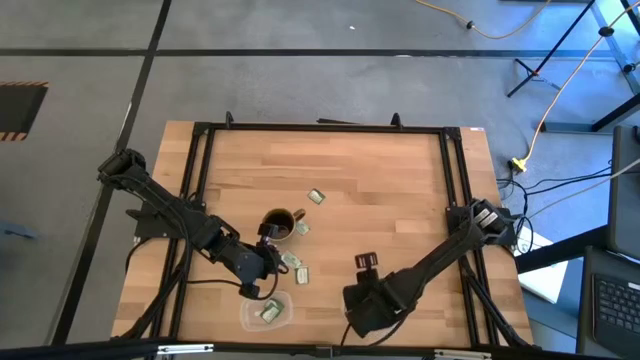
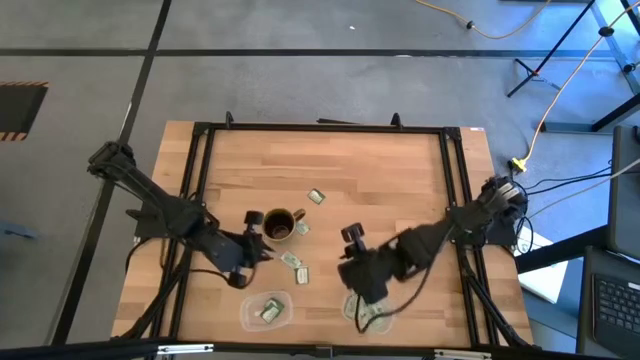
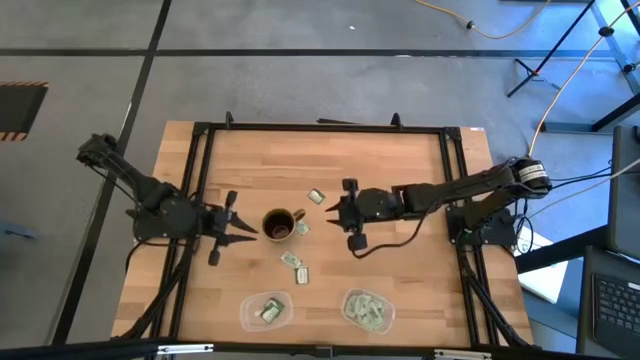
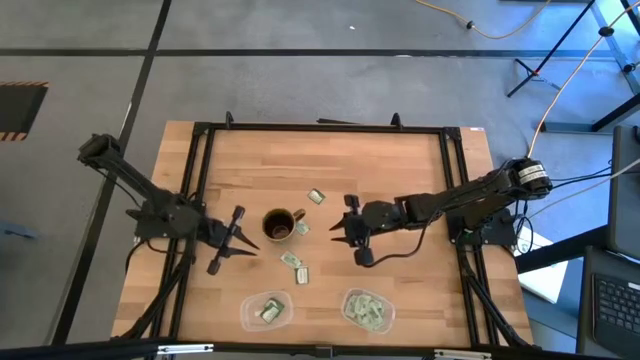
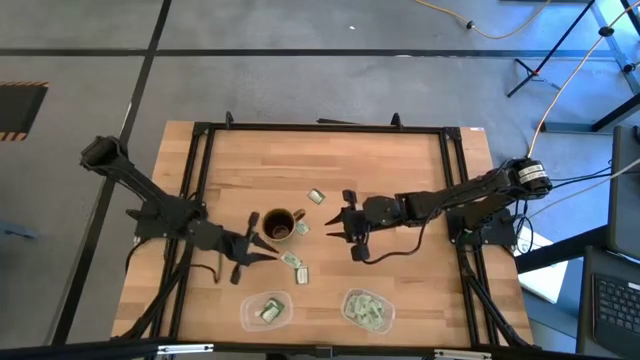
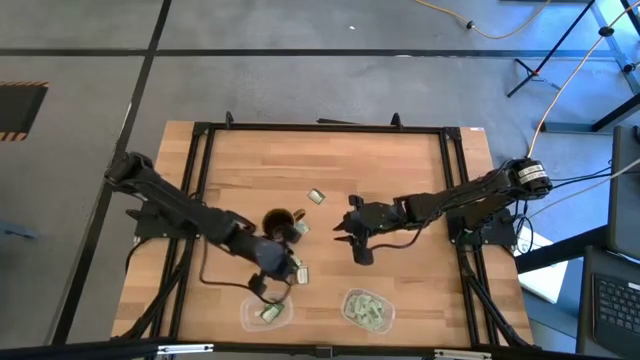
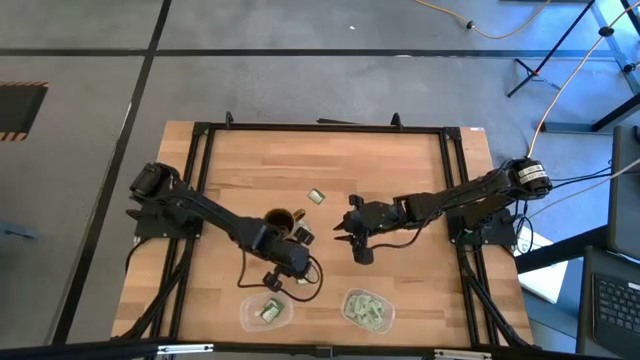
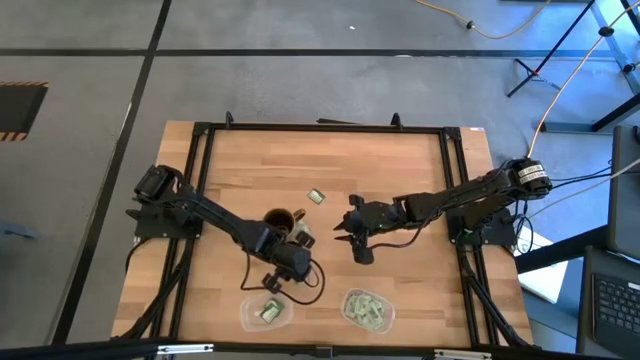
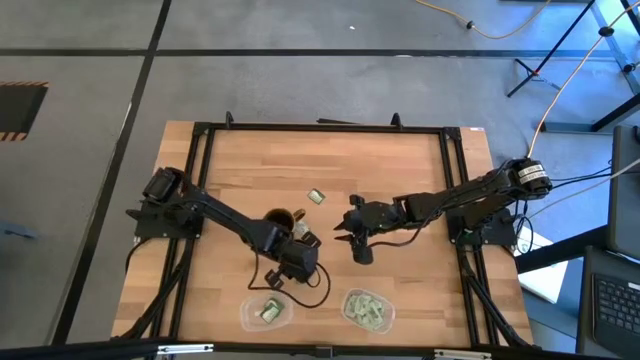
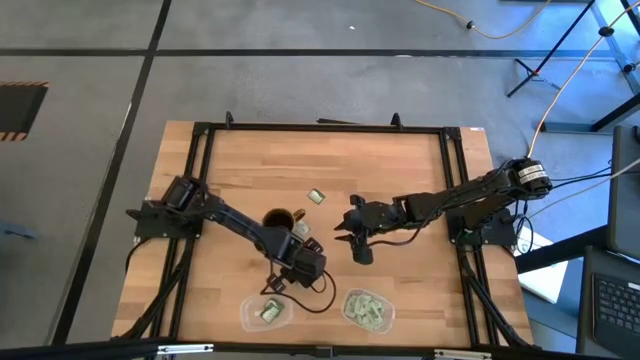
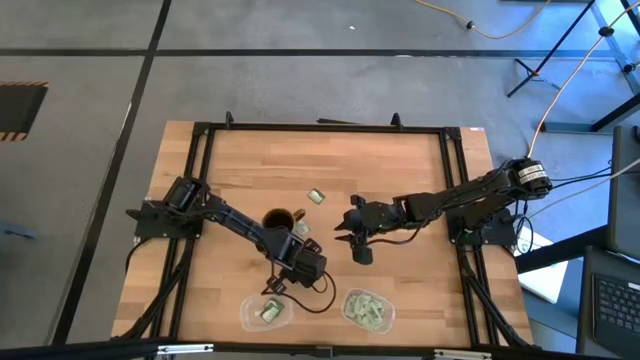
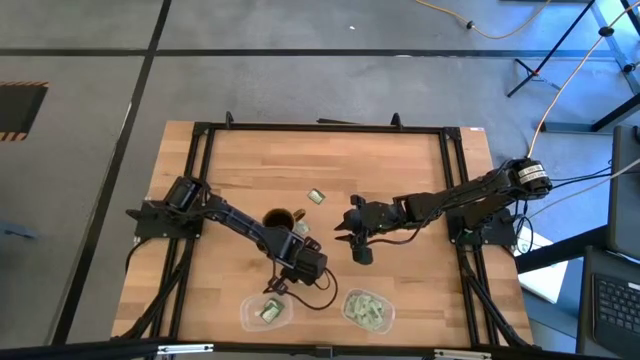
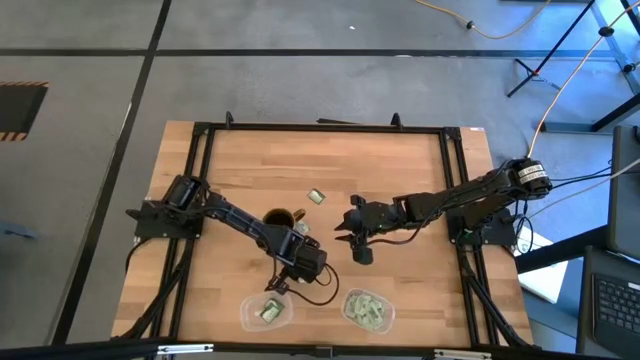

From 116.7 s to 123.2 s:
Task: Pick and place items into bin
Put the green stevia packet into the left transparent bin

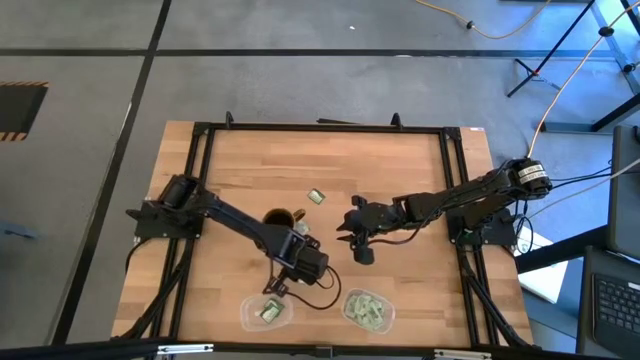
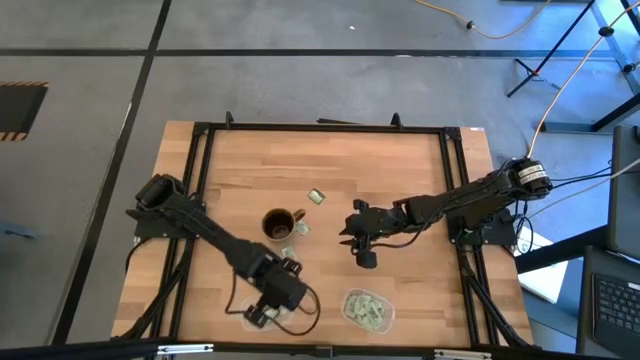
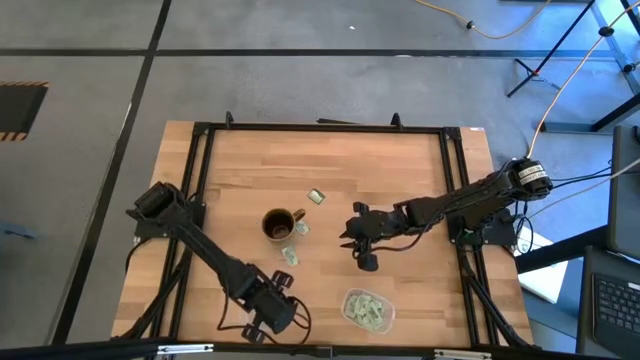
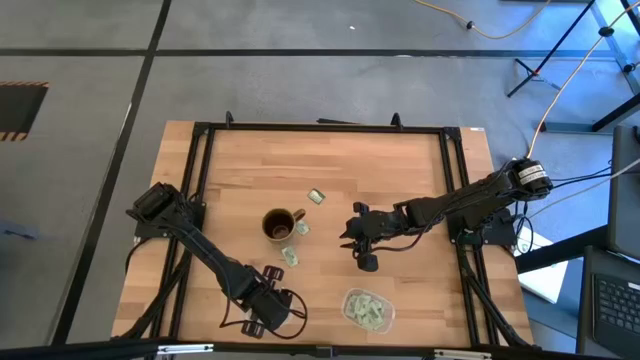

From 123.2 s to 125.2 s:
Put the green stevia packet into the left transparent bin

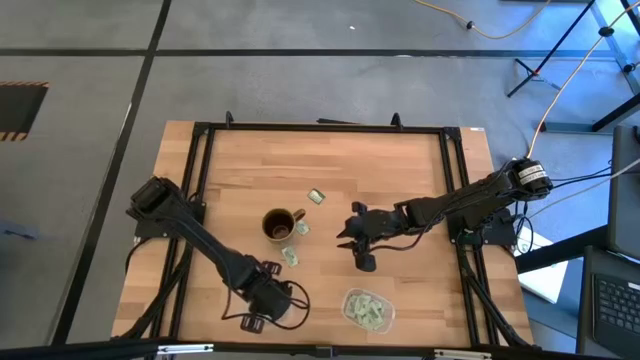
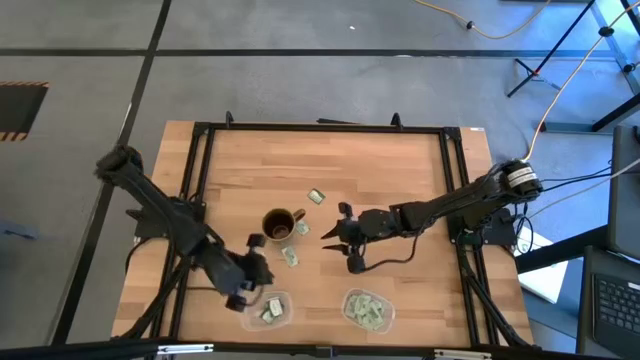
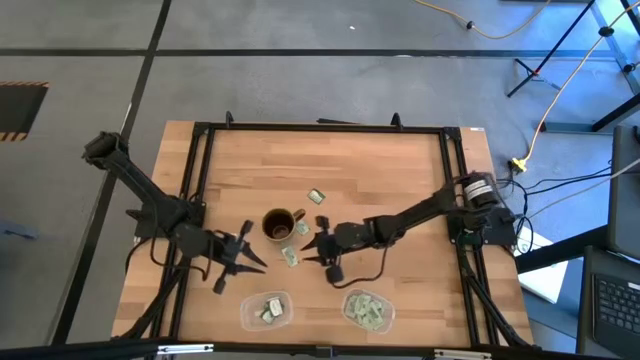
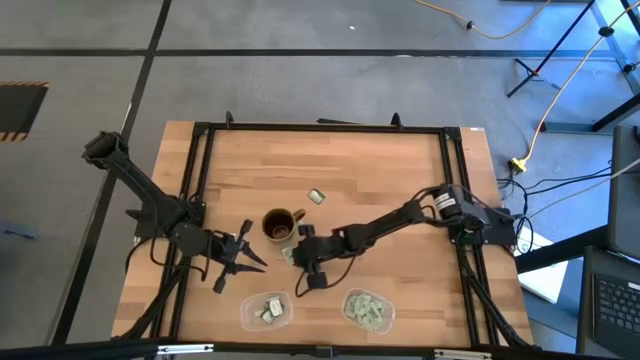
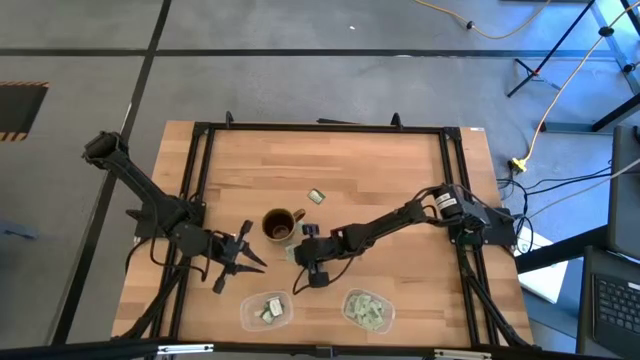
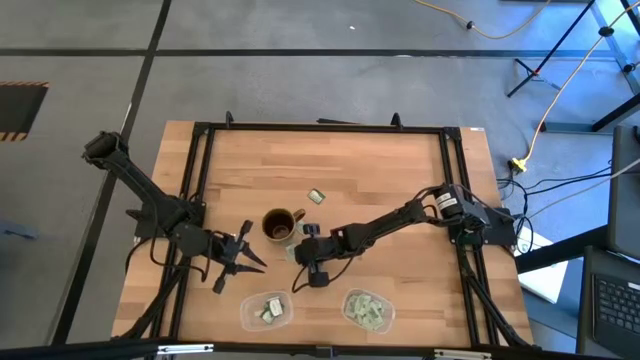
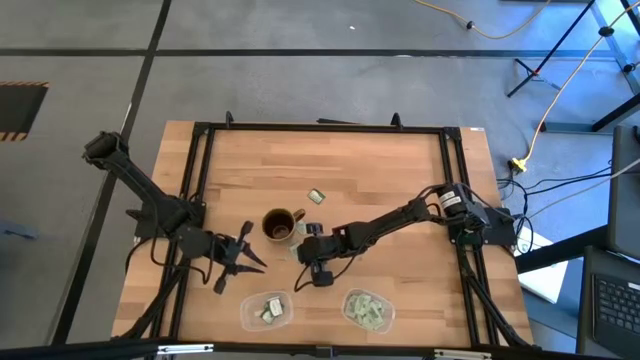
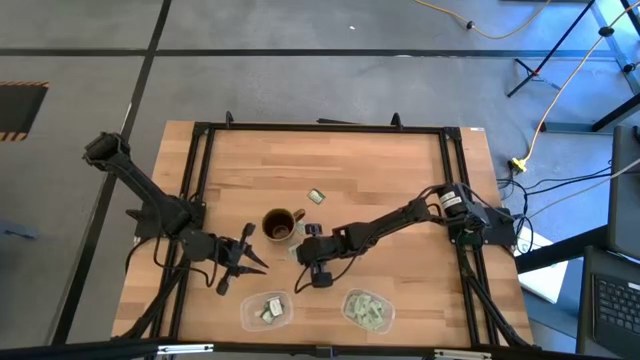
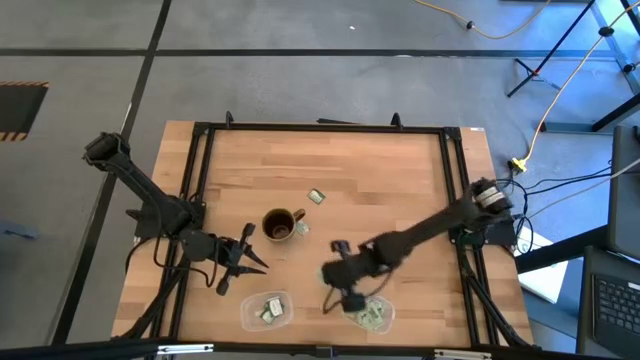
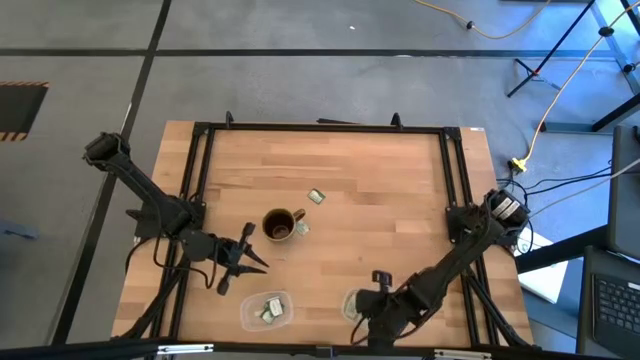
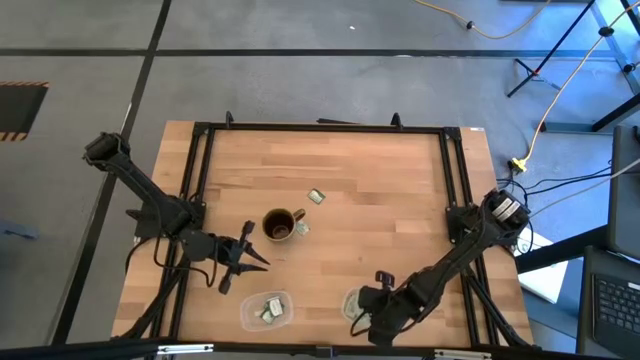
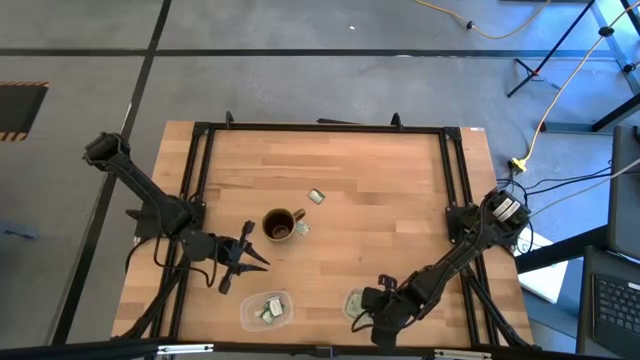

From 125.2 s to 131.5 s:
Put the white stevia packet into the right transparent bin

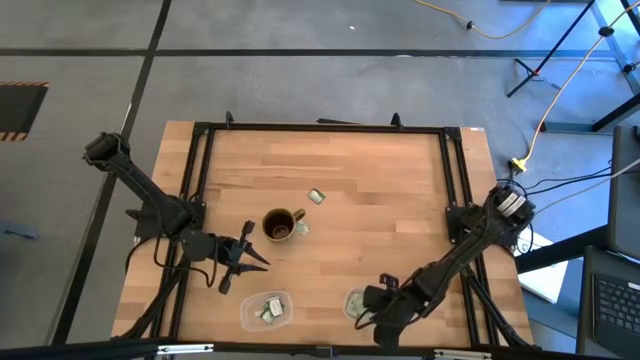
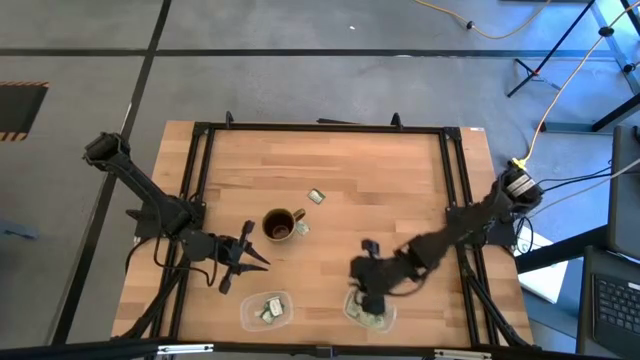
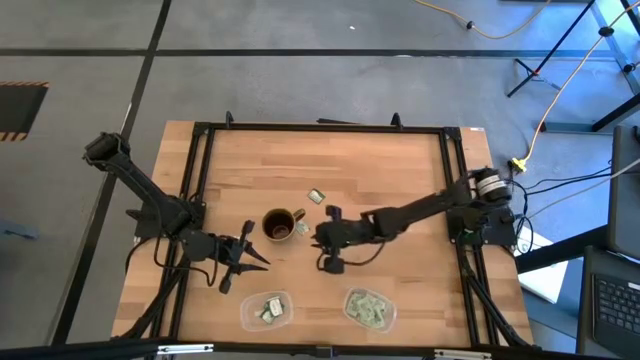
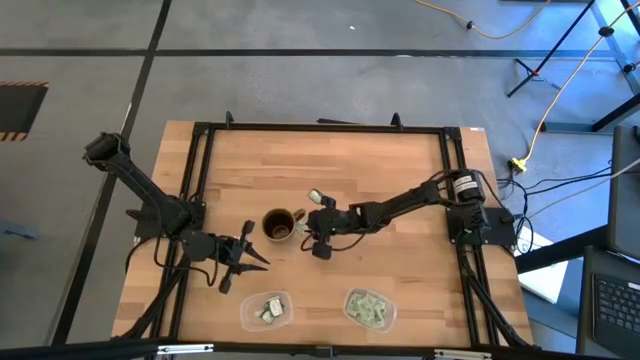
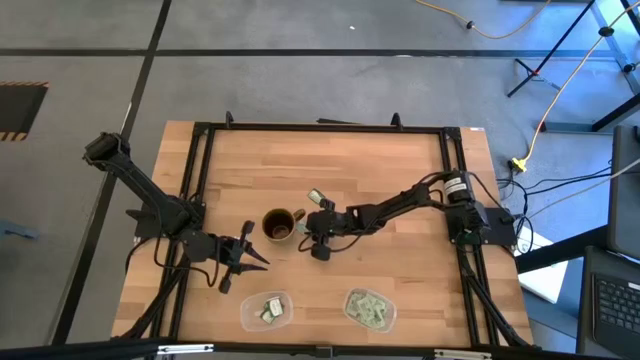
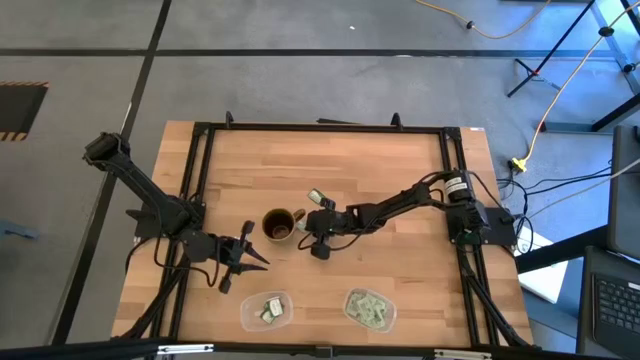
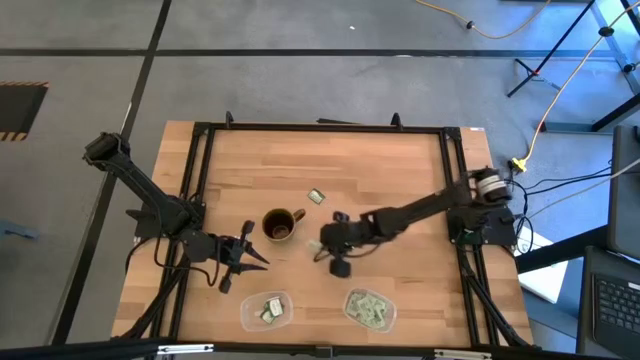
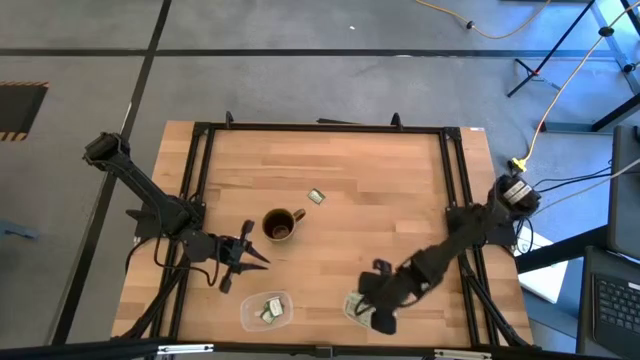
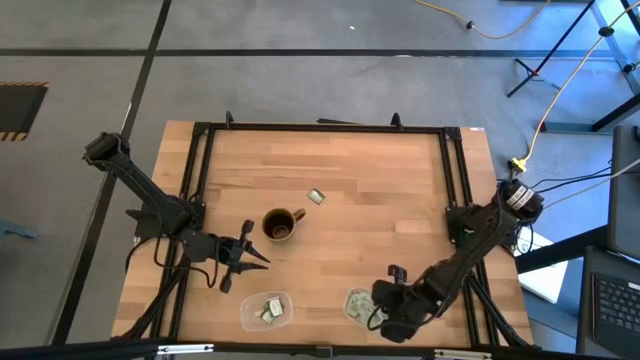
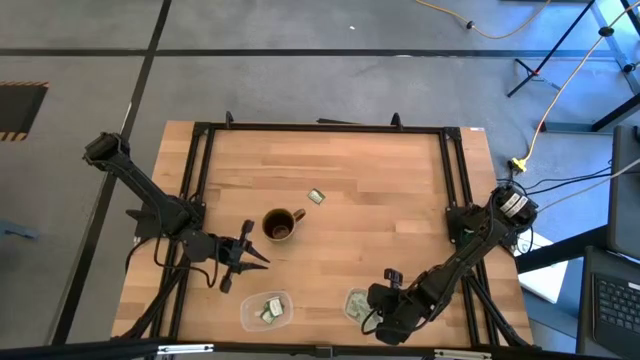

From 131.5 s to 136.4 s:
Put the white stevia packet into the right transparent bin

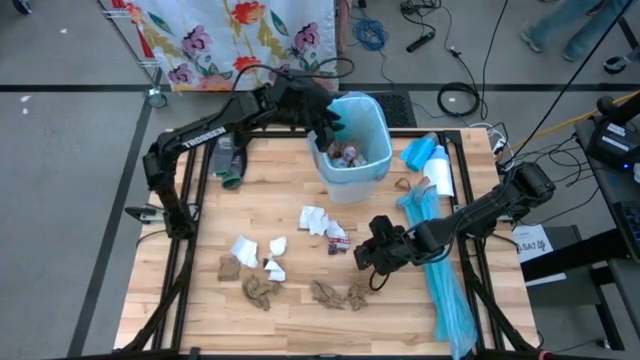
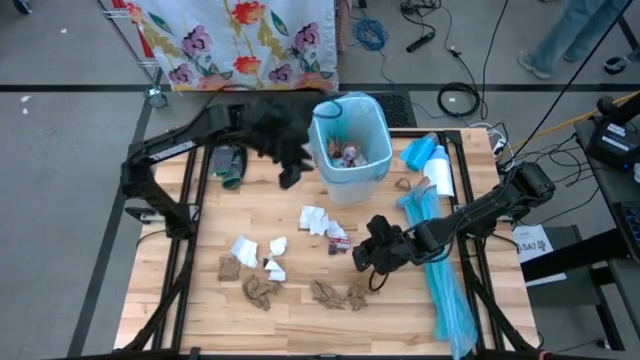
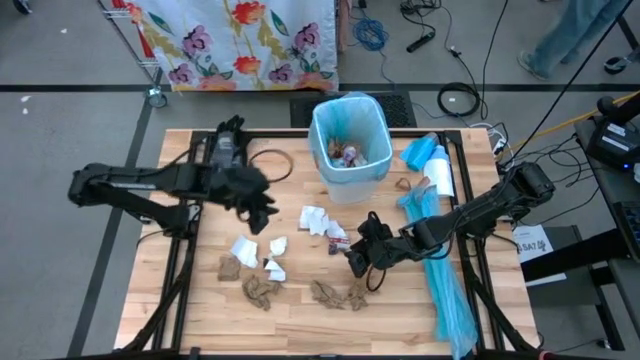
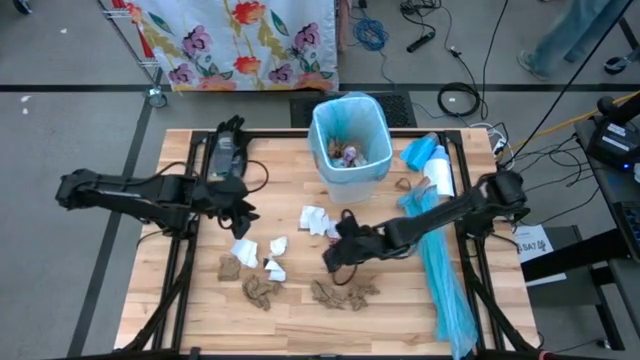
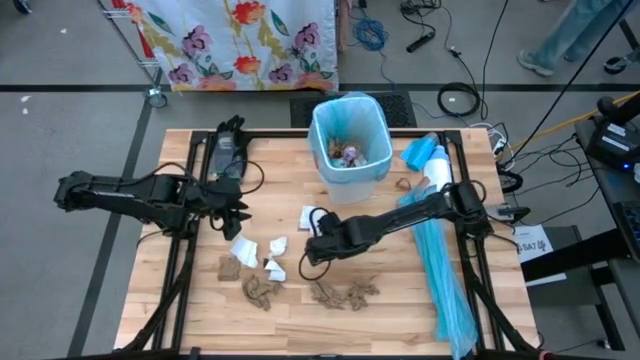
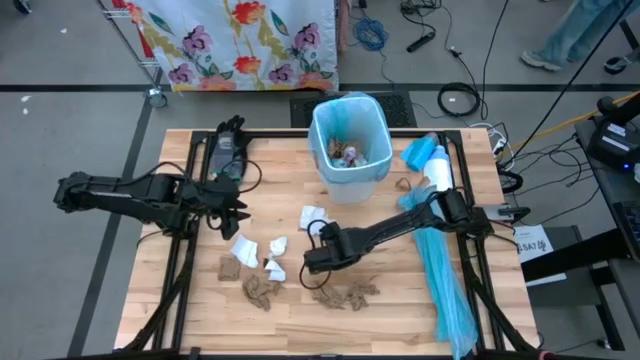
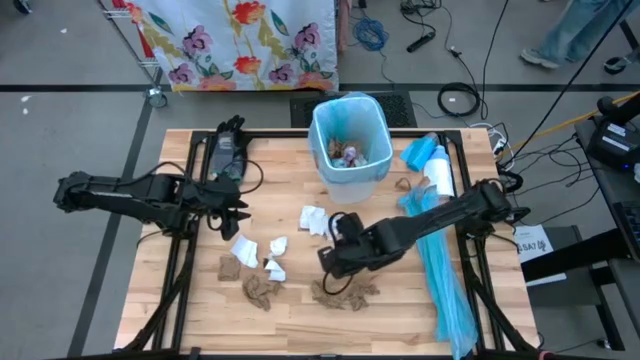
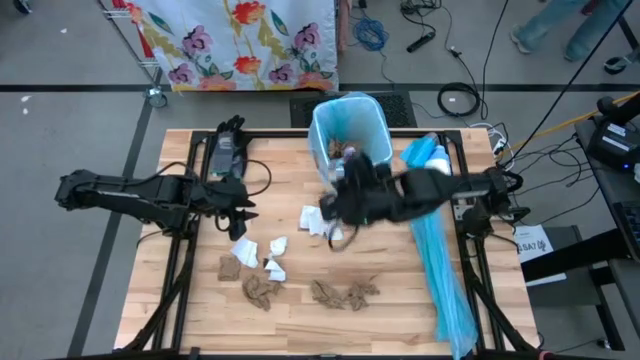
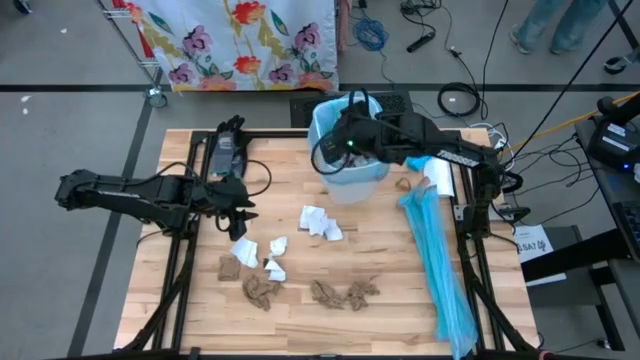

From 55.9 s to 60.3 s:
Task: place trash/remove bag and relplace
Put the piece of magazine into the trash bin
